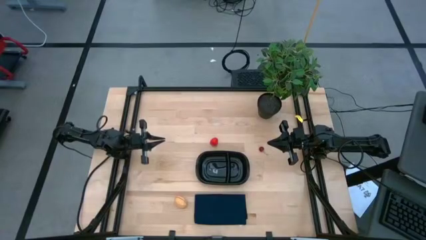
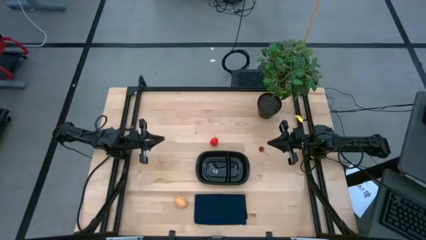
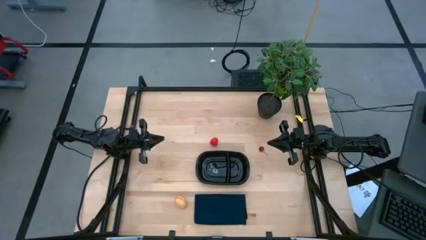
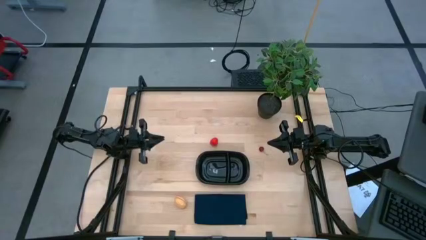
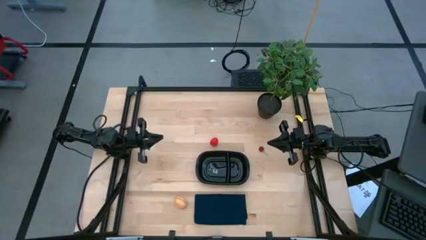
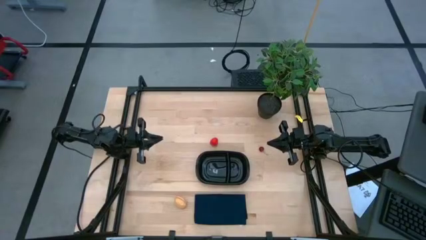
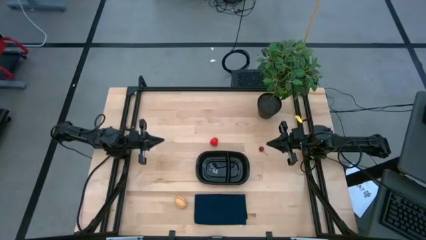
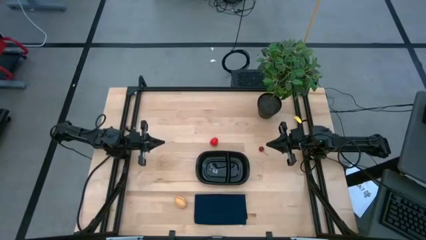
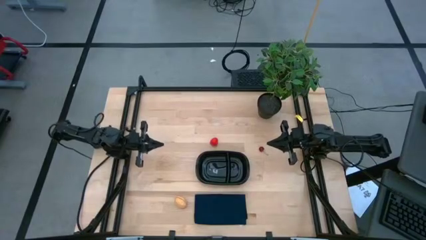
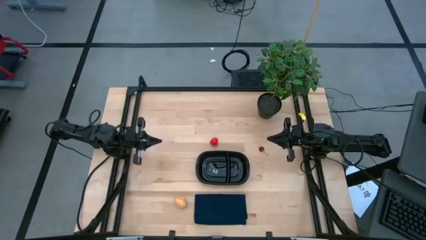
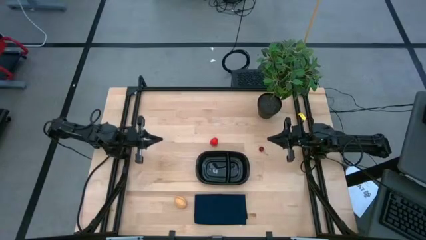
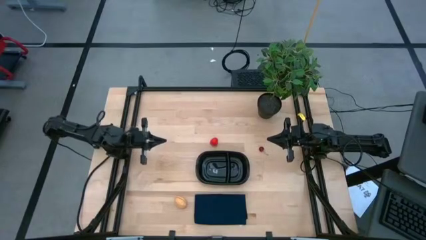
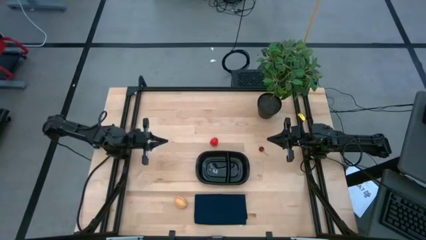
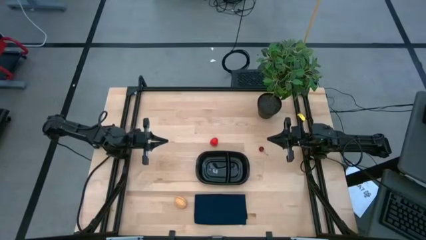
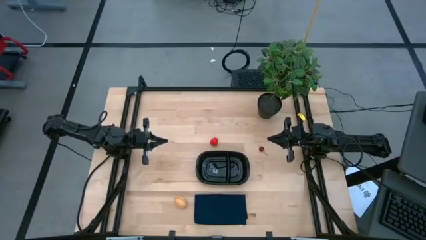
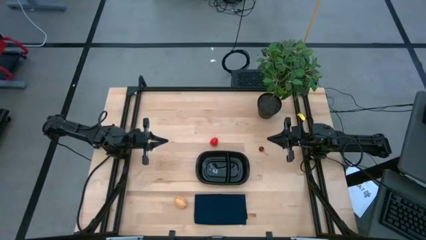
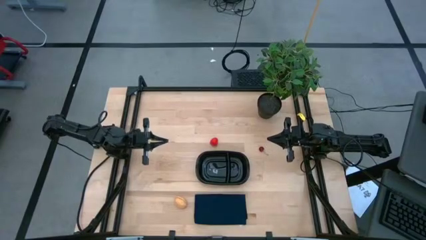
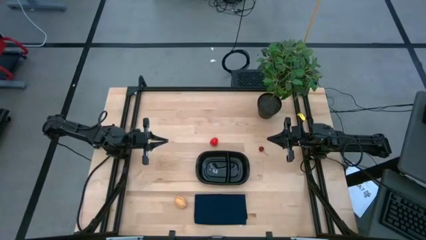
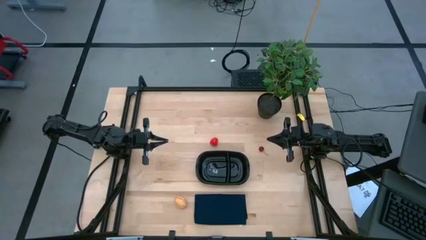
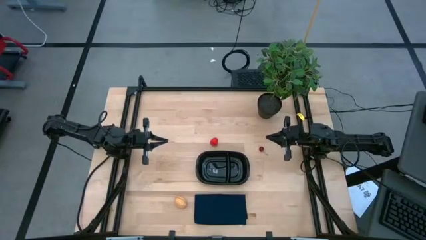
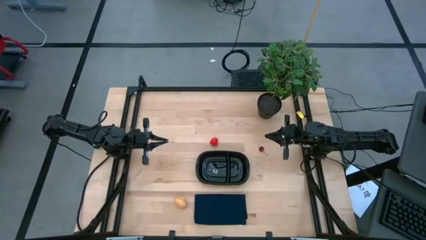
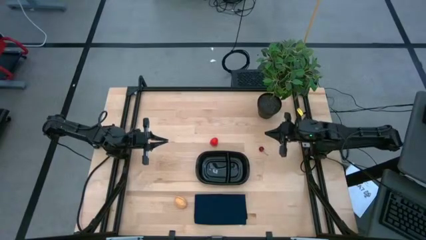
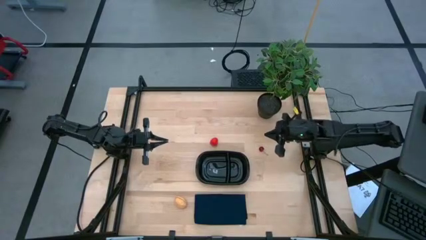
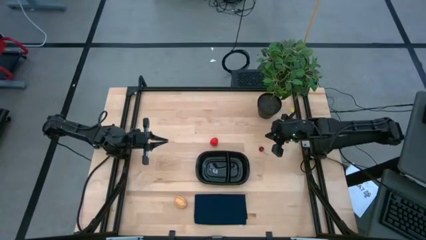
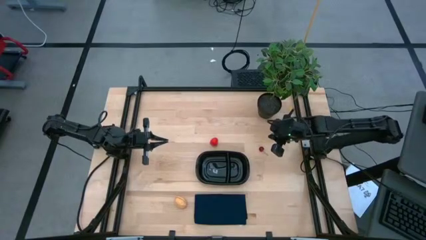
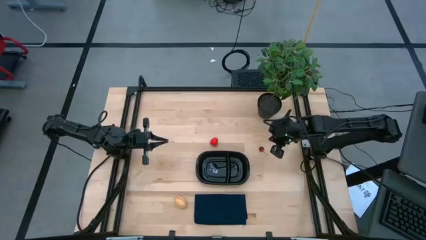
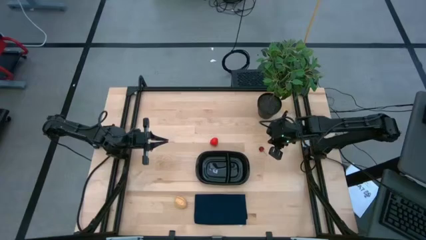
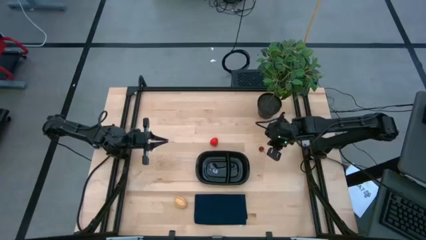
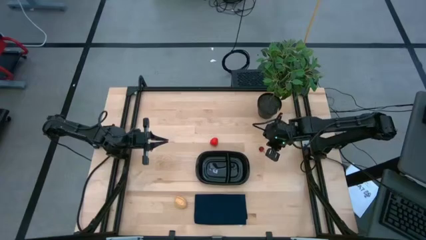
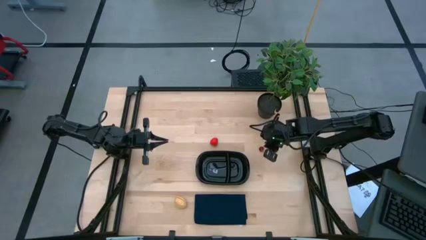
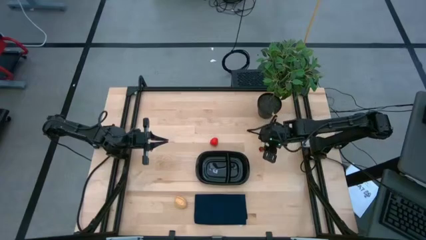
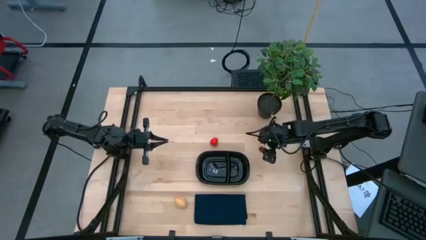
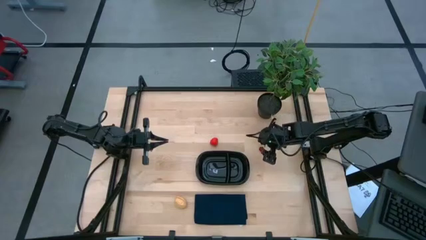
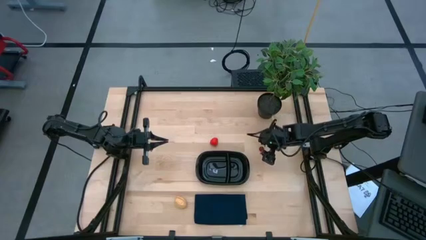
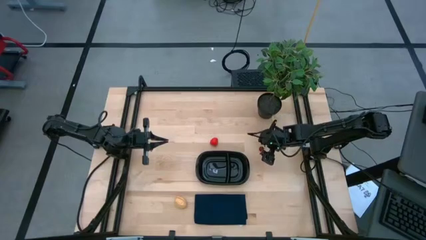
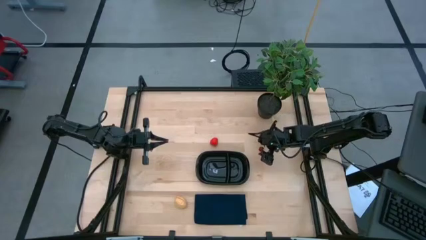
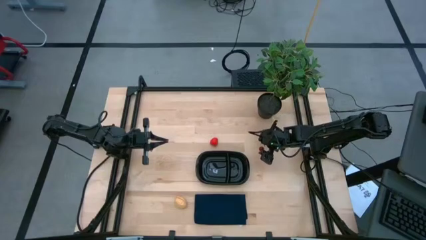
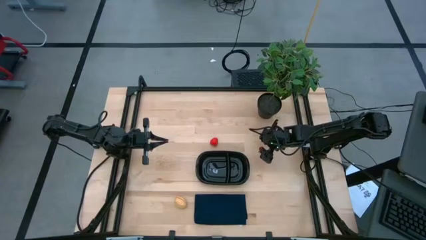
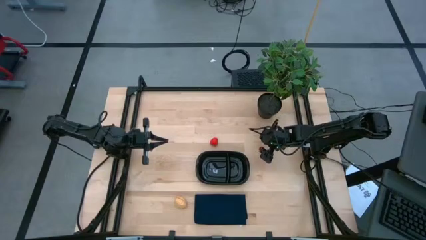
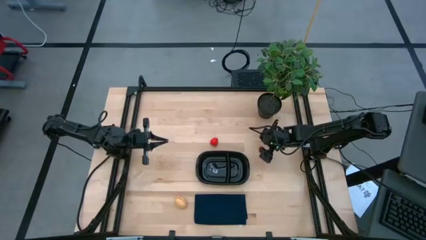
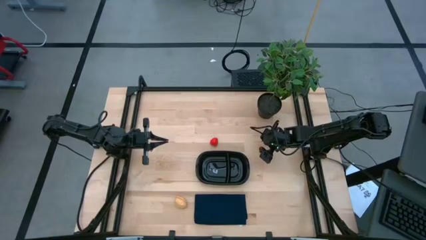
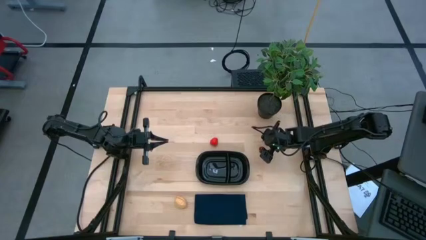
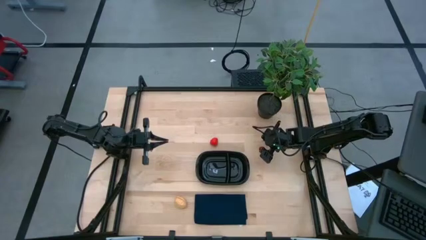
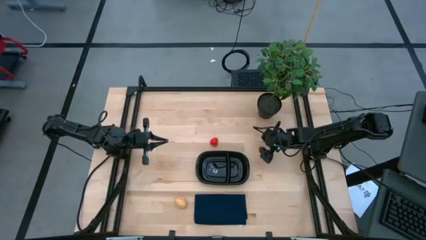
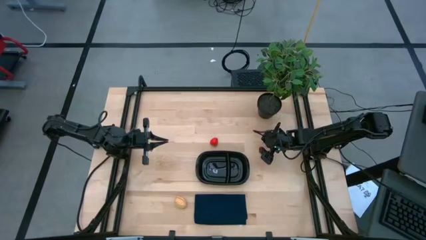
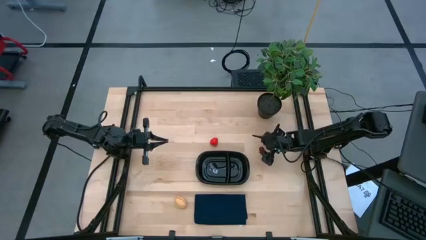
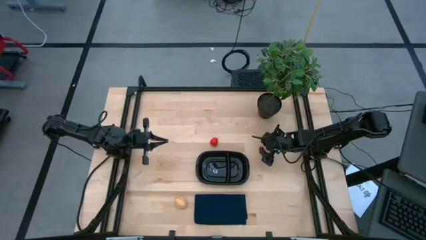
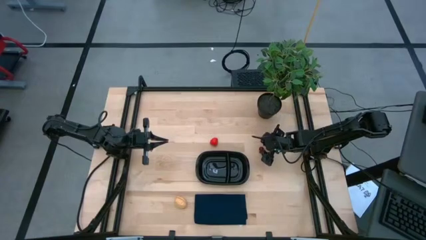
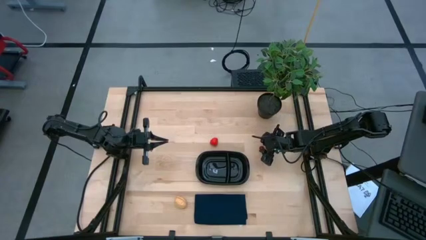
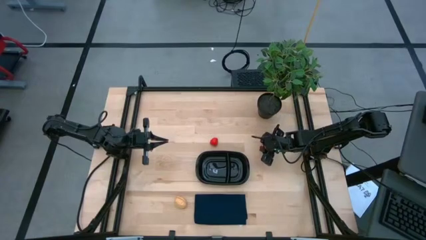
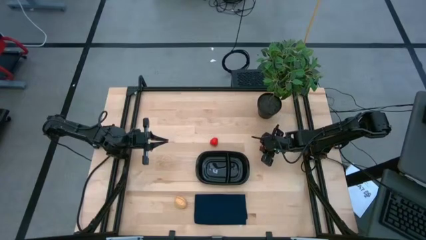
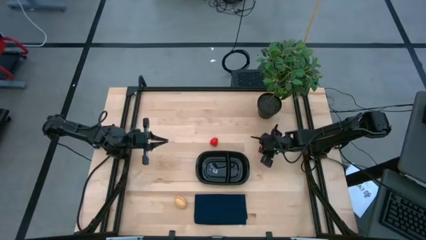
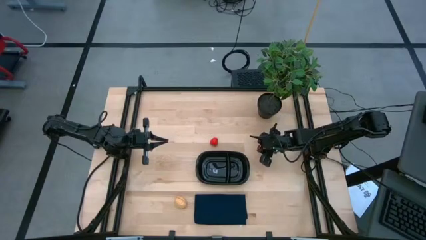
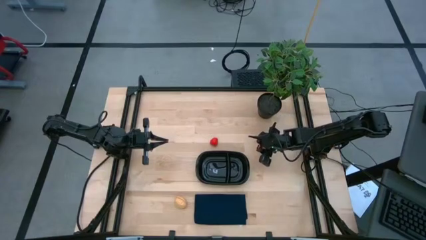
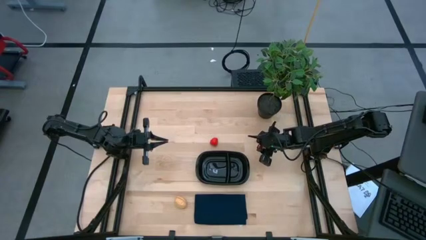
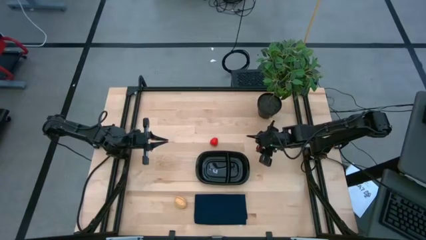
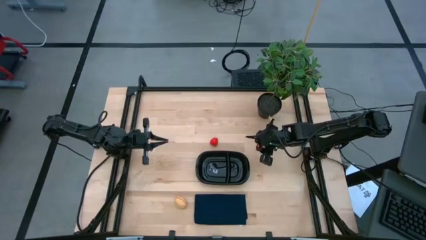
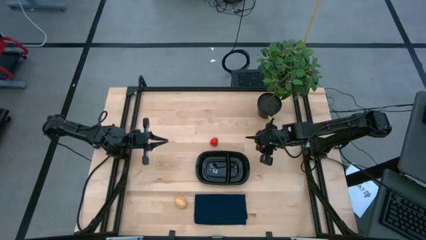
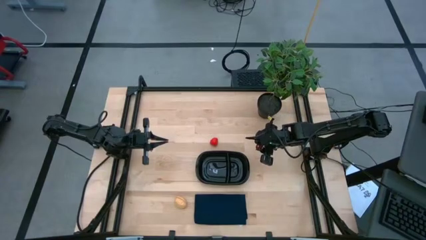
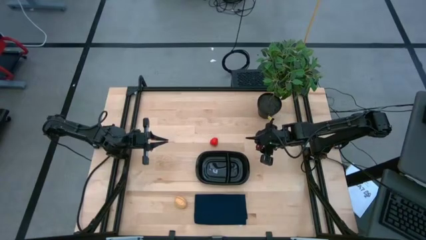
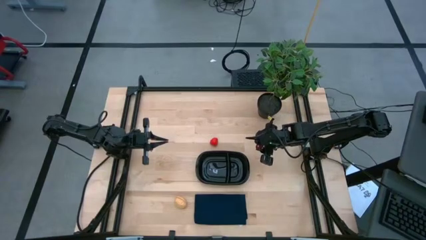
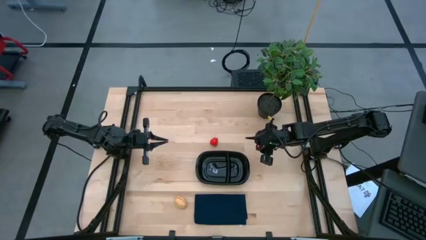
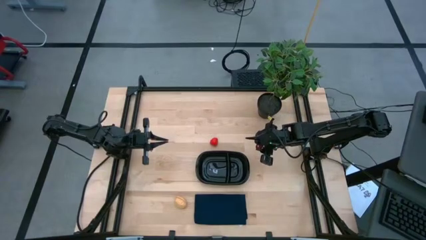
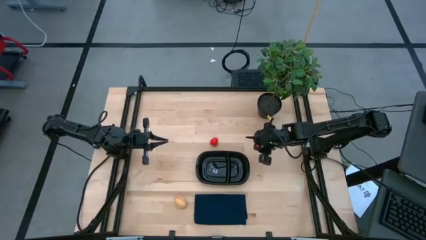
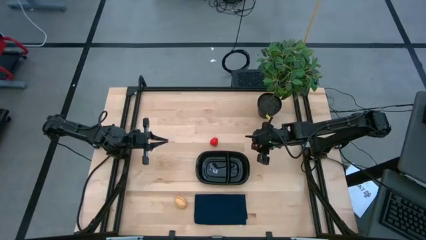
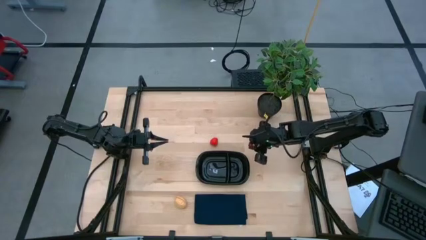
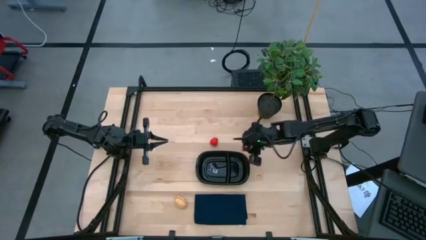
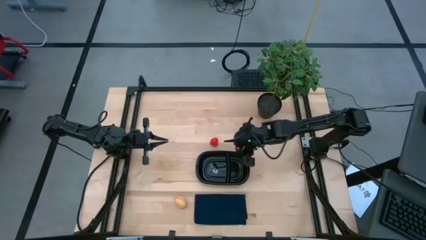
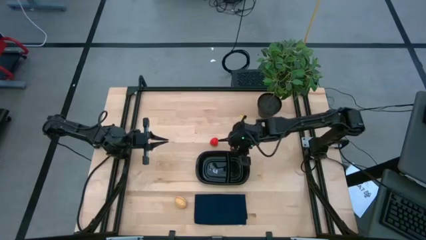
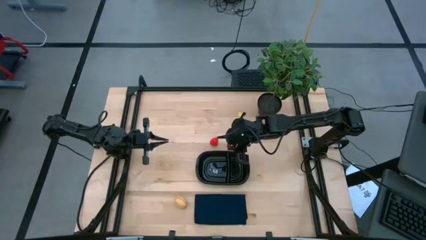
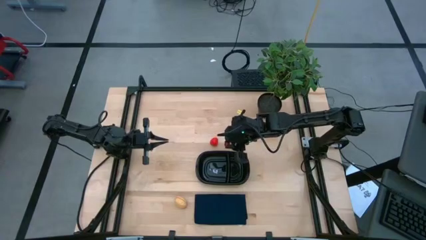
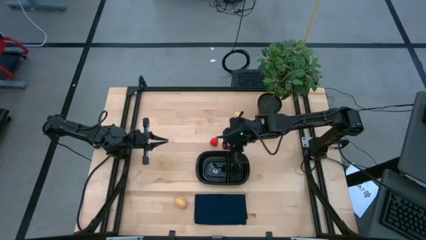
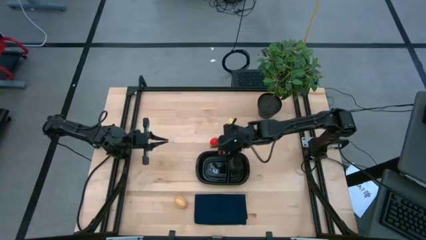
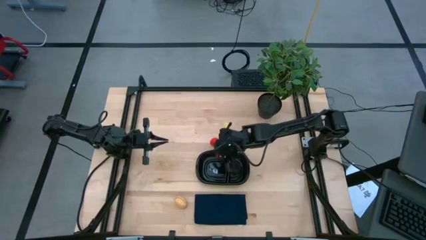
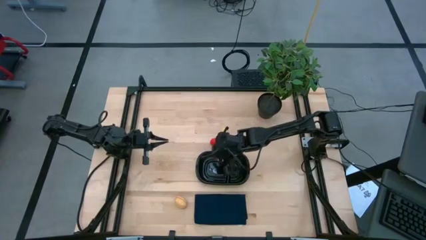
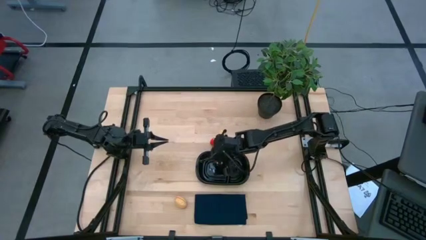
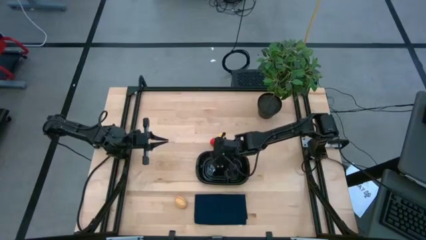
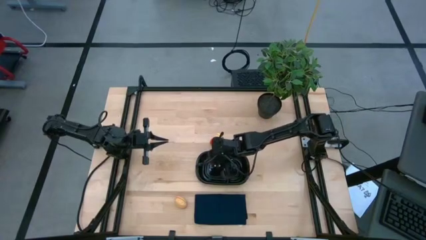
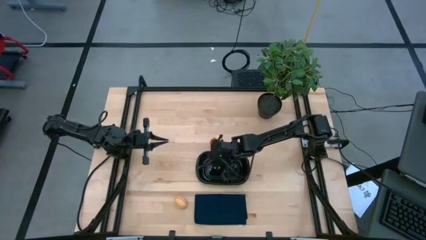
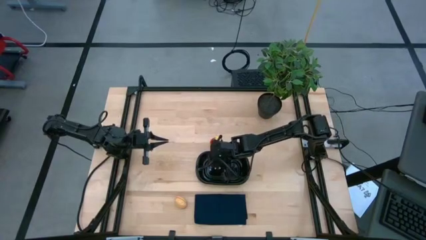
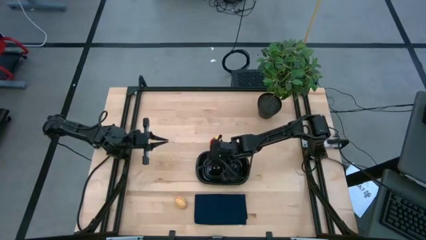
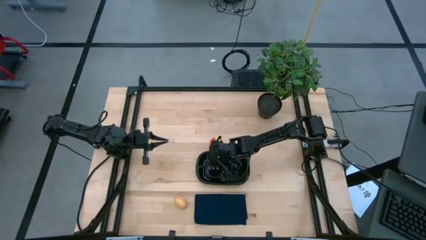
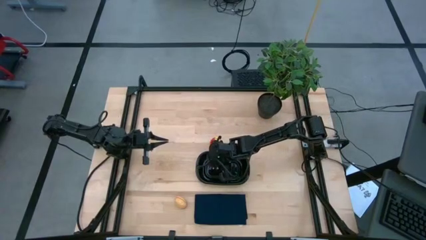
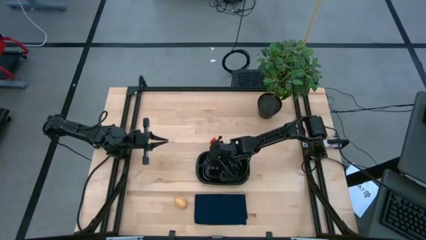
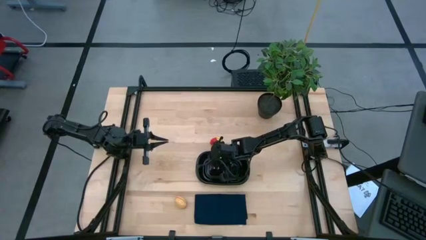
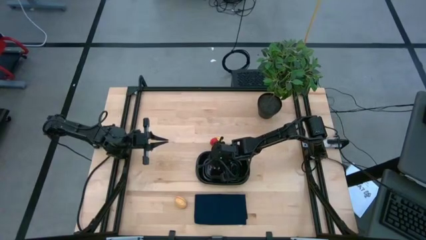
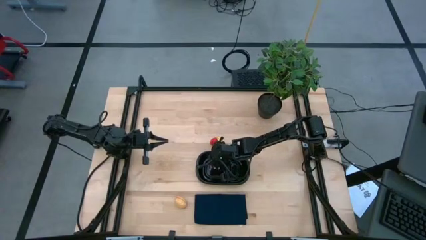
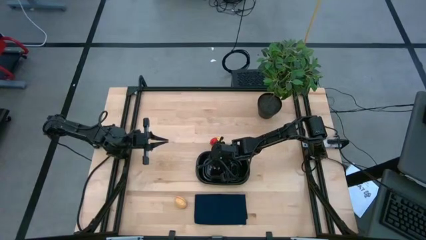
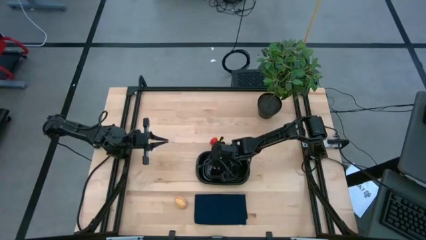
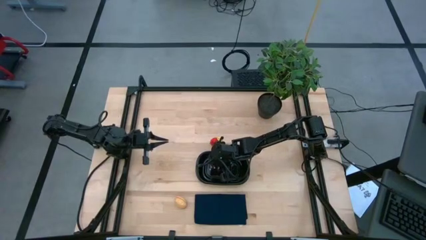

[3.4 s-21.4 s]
Task: Pick and placing Produce into tupperware
Put the cherry into the black container
